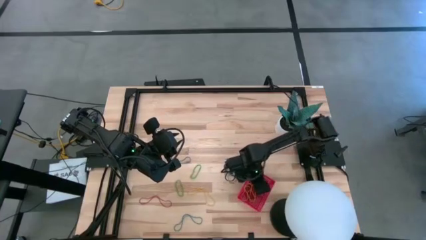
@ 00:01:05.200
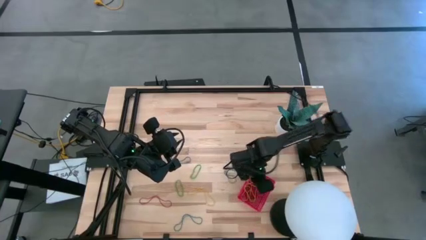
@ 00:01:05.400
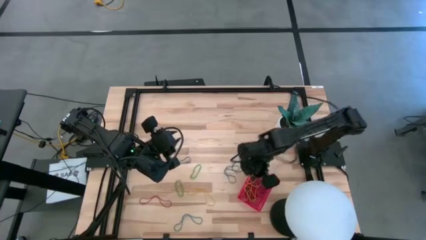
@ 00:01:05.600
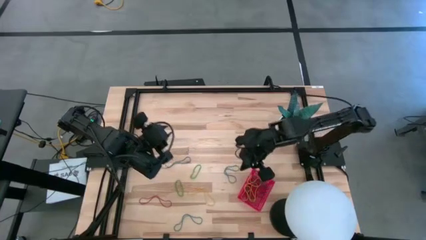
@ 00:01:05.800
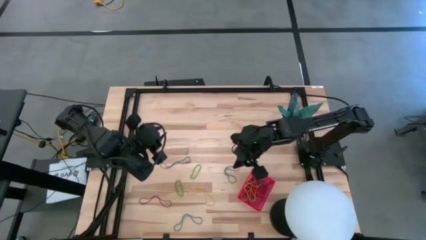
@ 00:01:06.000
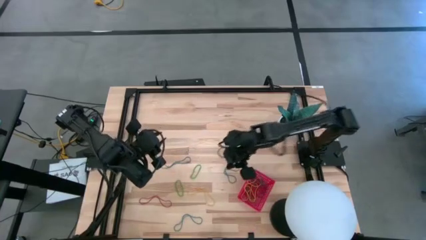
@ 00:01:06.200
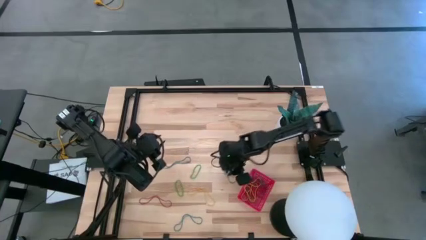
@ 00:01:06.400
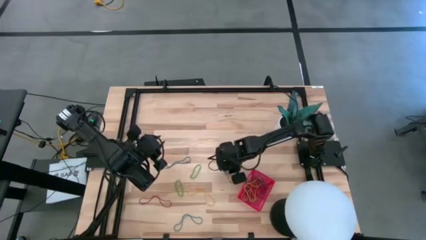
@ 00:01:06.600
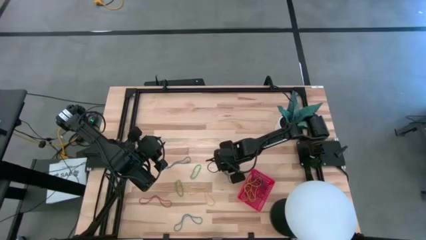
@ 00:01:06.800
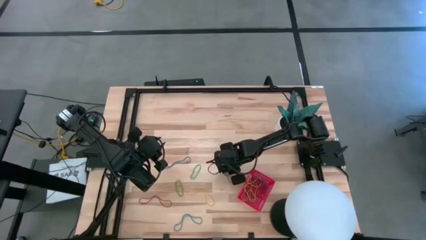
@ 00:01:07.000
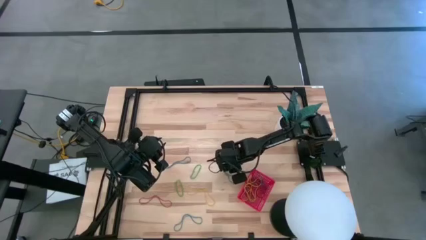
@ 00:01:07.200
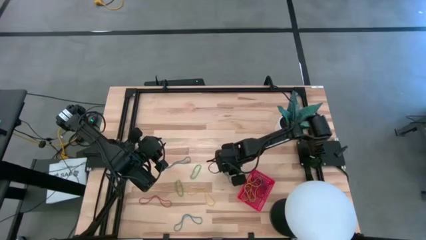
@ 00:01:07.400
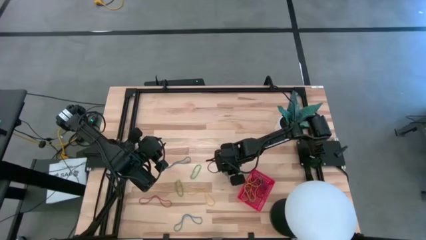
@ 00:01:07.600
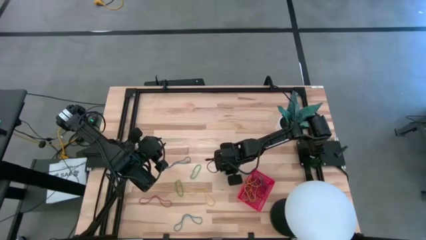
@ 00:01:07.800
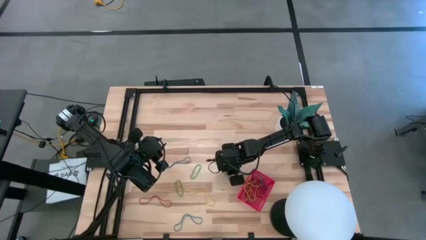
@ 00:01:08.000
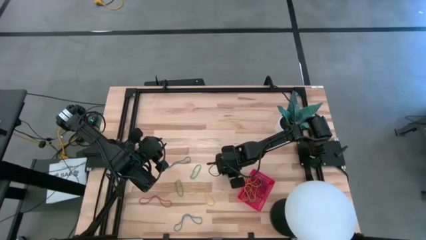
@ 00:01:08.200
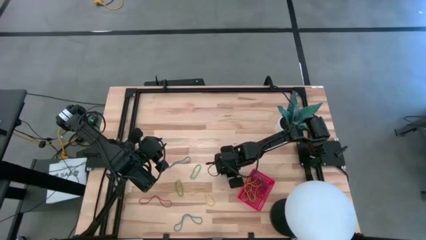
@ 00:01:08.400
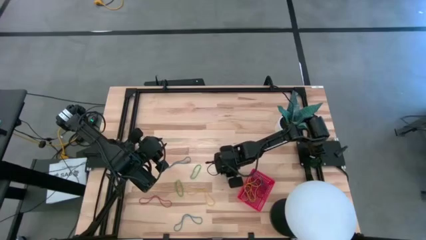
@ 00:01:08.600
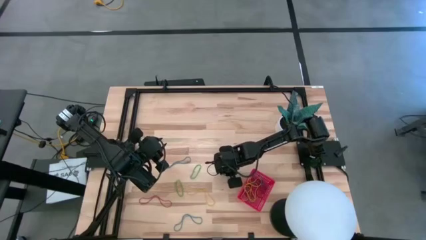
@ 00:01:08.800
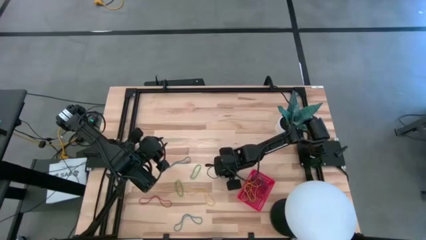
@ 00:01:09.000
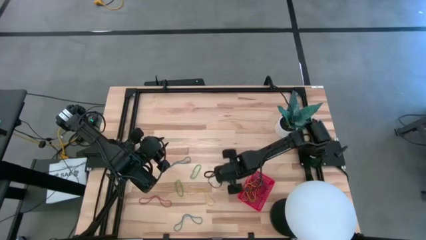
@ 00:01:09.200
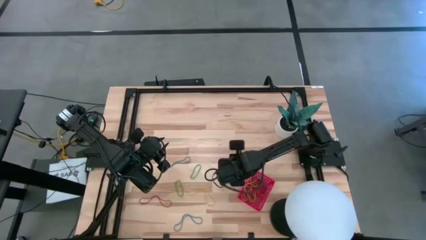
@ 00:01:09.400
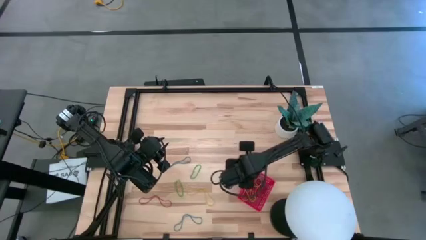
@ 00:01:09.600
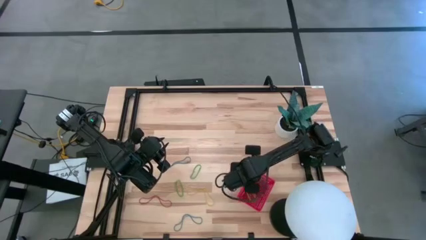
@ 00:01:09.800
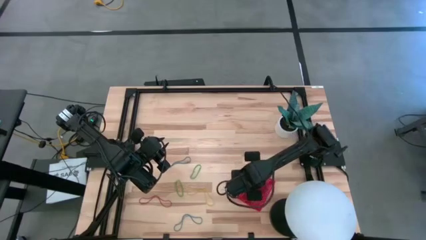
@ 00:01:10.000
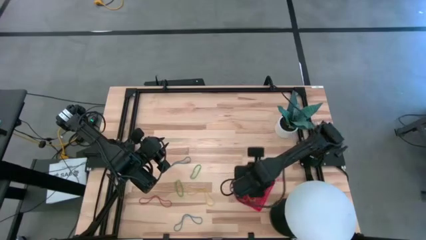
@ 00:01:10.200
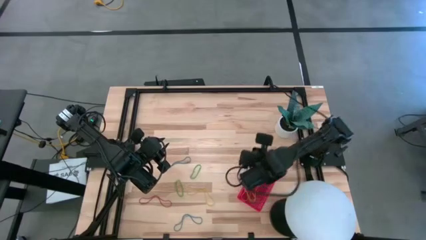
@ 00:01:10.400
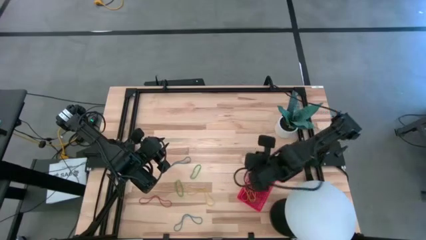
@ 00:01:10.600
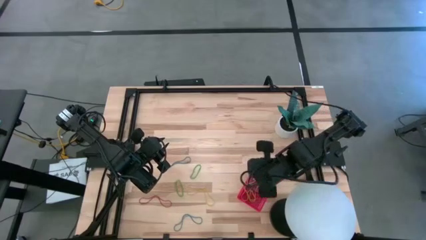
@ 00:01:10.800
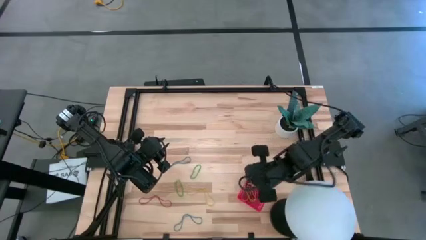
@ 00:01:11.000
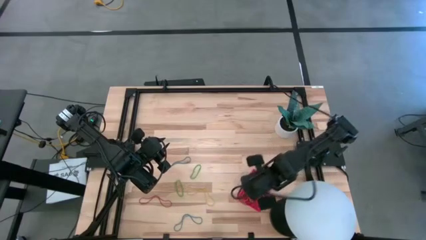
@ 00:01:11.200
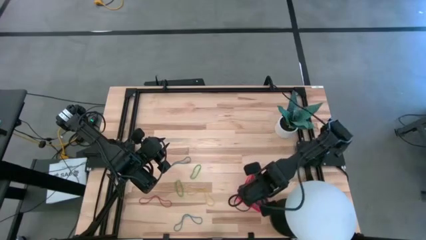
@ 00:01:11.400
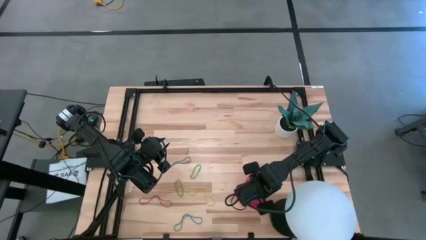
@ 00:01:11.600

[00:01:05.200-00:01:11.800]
Task: Pick and place items into bin
Put the blue rubber band into the red bin

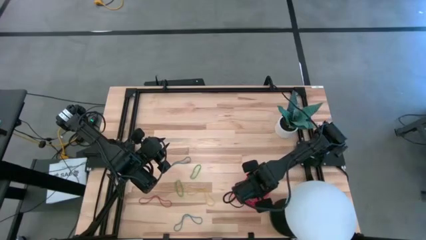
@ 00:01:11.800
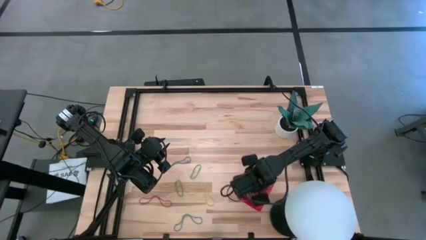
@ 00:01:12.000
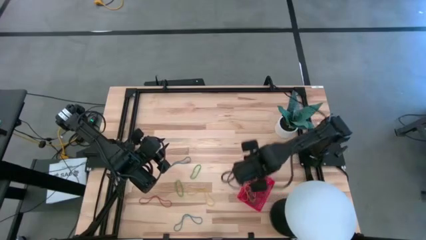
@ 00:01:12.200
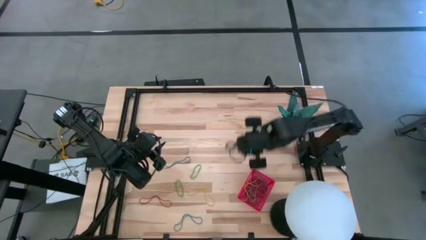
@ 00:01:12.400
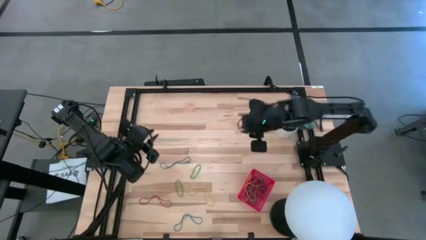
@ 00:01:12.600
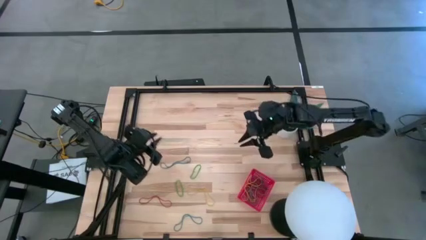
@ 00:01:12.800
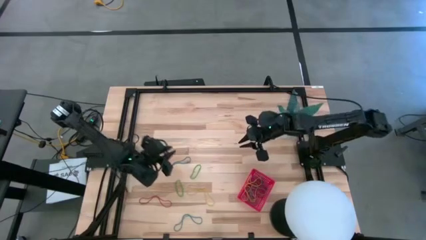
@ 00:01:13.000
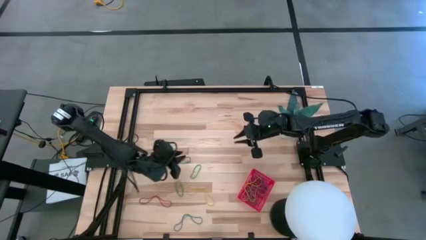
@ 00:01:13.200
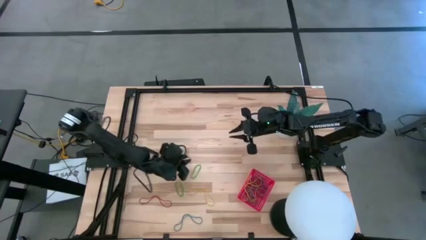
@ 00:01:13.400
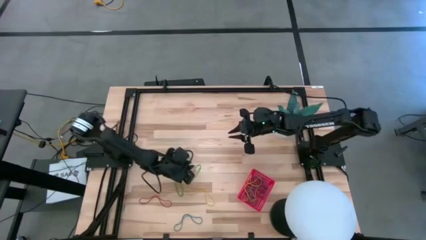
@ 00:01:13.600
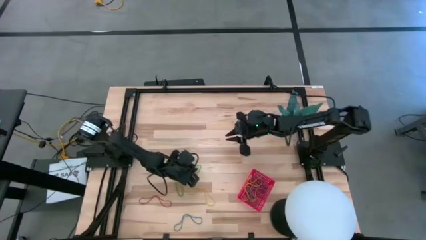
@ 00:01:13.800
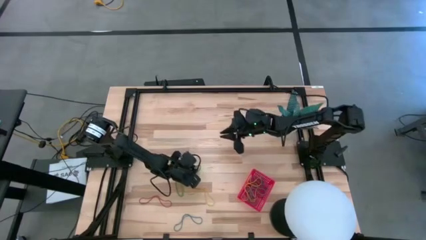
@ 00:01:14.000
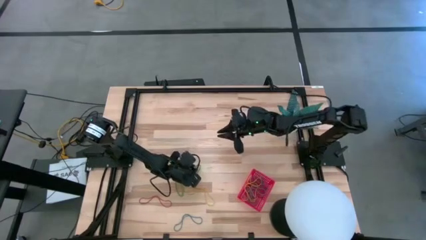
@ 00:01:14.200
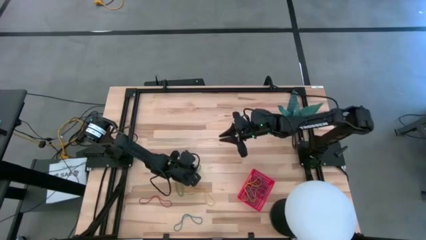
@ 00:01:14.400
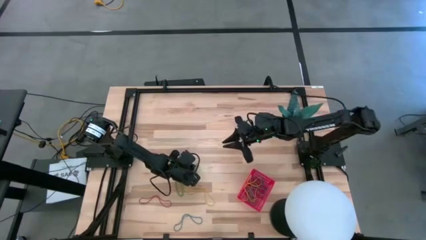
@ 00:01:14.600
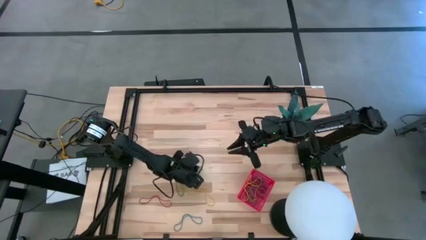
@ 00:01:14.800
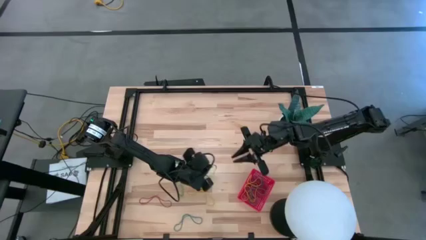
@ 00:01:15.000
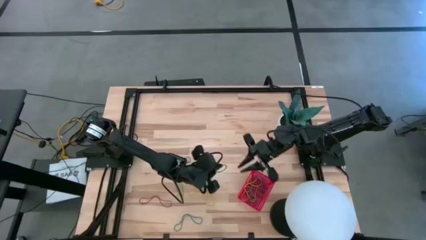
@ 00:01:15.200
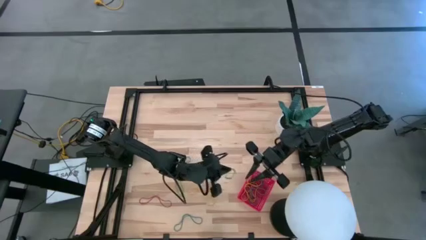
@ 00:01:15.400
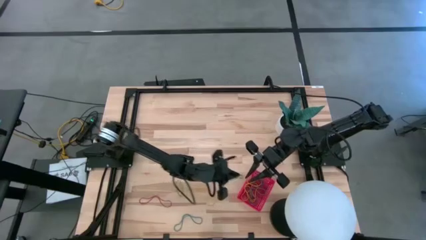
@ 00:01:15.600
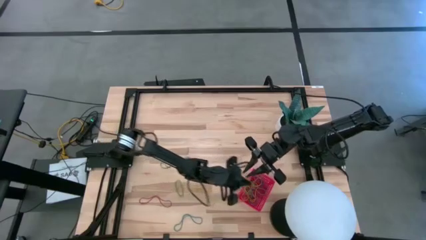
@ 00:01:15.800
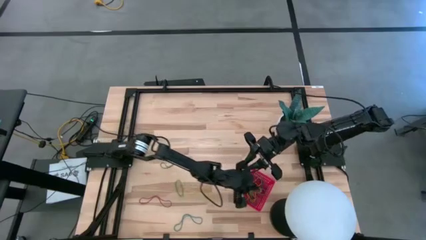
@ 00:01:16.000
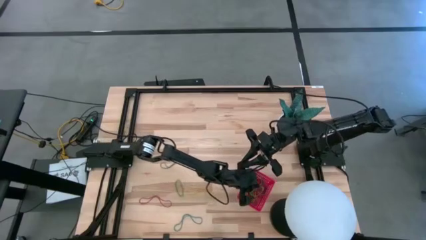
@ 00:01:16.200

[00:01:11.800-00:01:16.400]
Put the green rubber band into the red bin

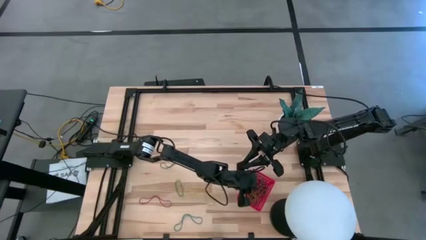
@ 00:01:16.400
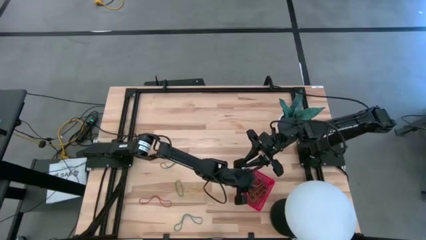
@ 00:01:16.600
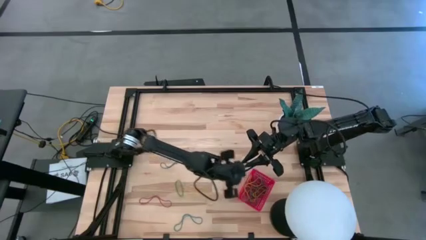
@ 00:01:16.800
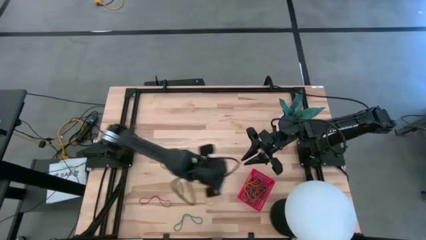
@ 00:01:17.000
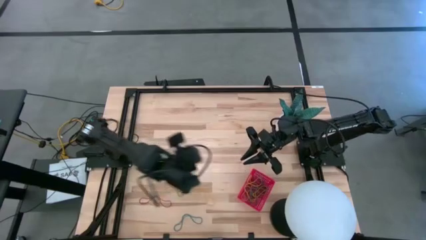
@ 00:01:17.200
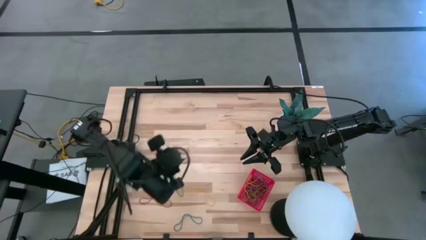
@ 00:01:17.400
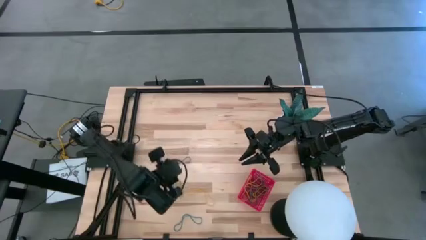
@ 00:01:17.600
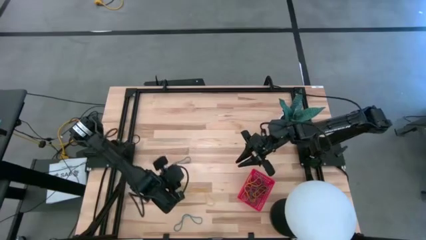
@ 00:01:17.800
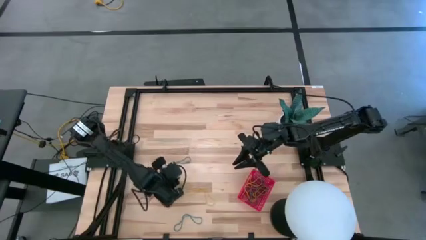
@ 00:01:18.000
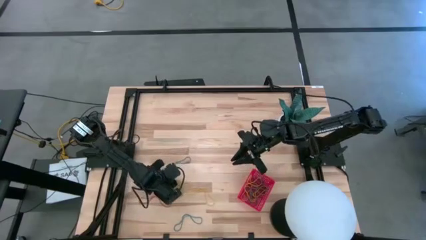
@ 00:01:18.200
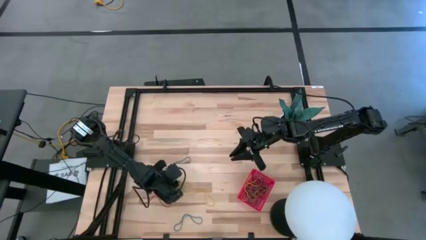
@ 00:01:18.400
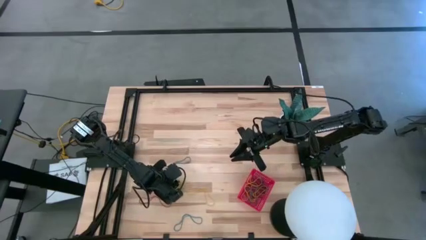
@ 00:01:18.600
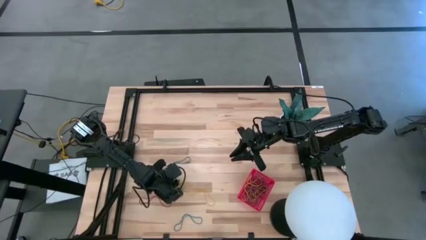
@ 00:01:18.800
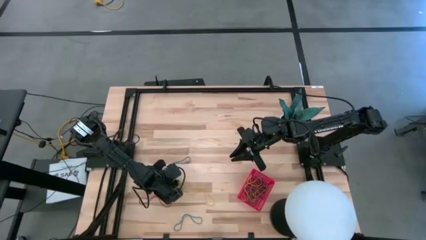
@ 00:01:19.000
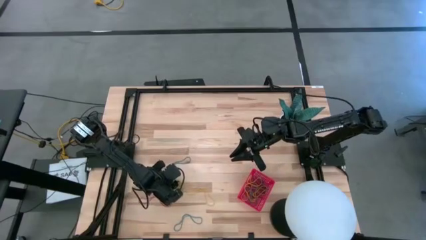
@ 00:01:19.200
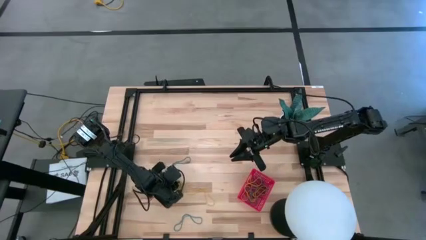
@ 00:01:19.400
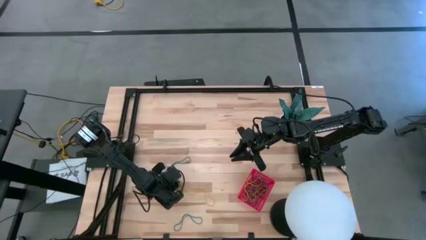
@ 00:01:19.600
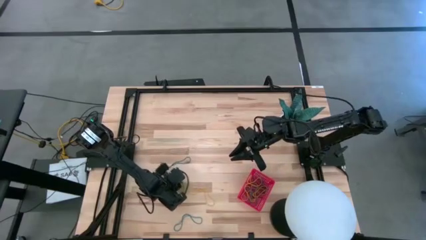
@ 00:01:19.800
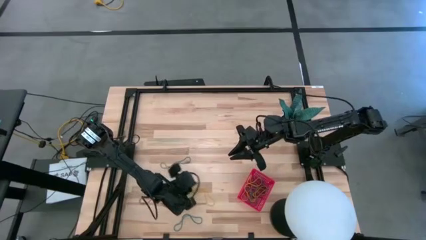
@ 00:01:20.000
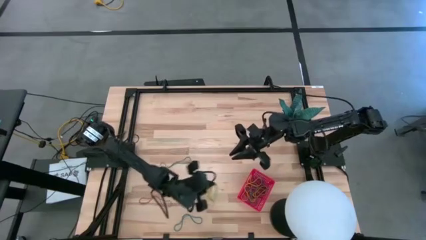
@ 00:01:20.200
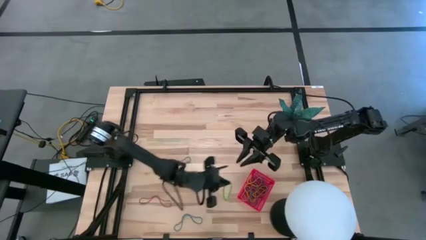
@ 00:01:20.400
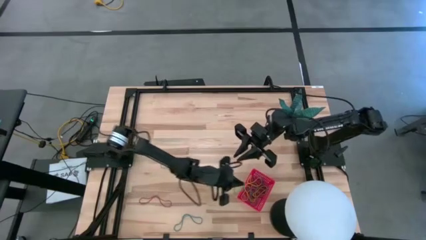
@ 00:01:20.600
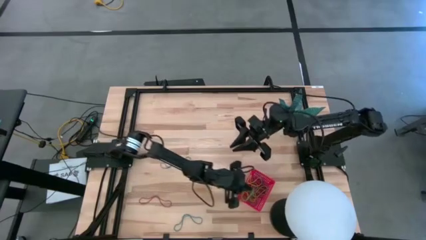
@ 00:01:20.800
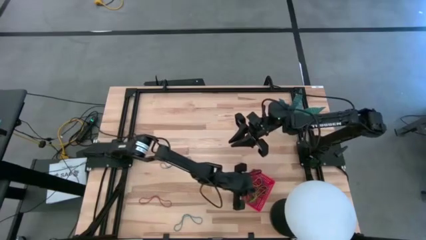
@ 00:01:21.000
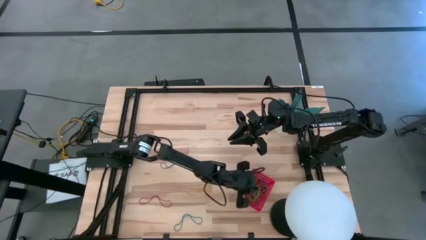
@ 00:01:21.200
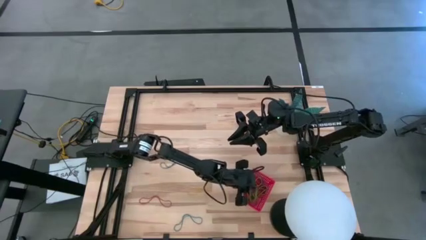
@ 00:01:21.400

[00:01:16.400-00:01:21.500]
Put the green rubber band into the red bin
